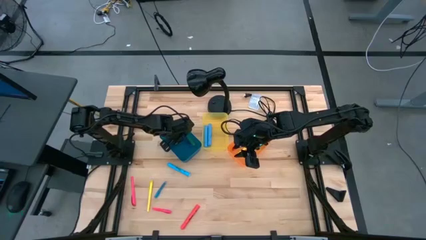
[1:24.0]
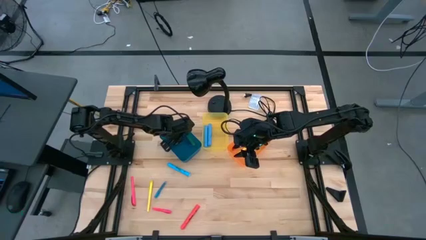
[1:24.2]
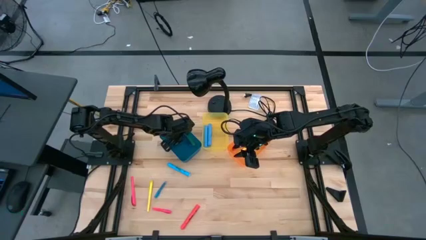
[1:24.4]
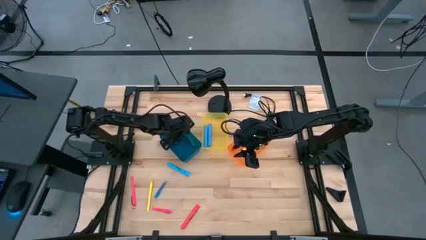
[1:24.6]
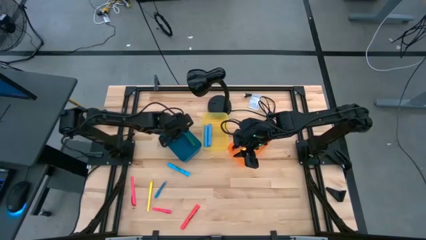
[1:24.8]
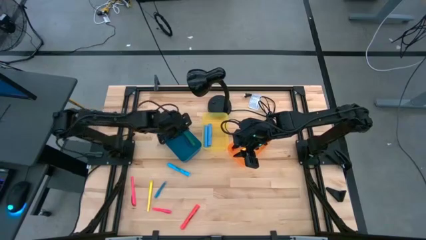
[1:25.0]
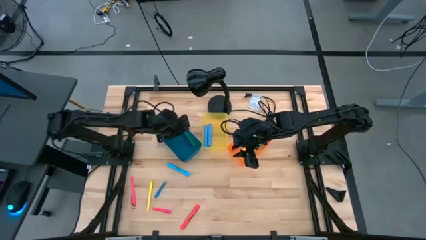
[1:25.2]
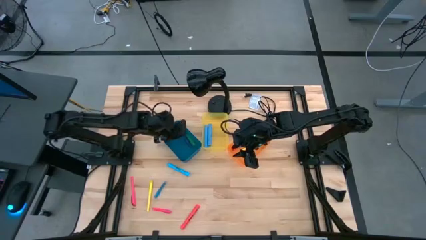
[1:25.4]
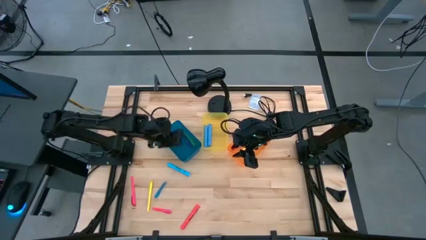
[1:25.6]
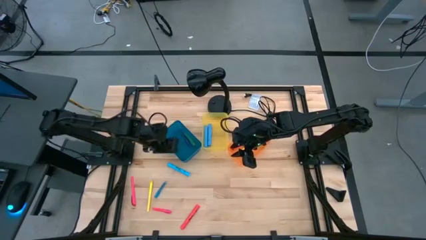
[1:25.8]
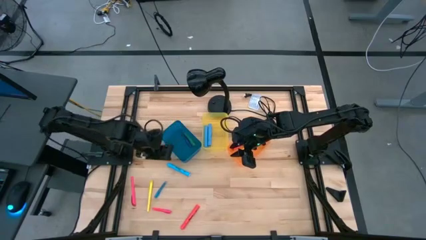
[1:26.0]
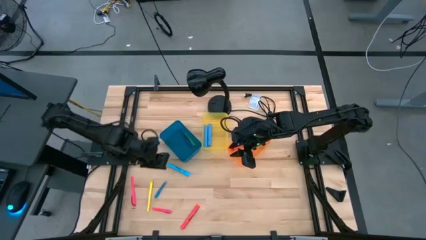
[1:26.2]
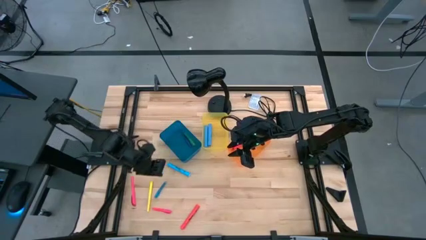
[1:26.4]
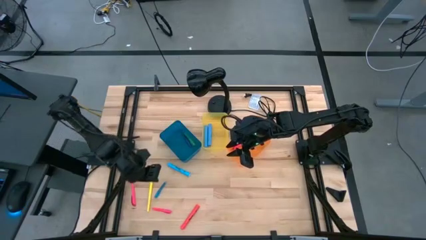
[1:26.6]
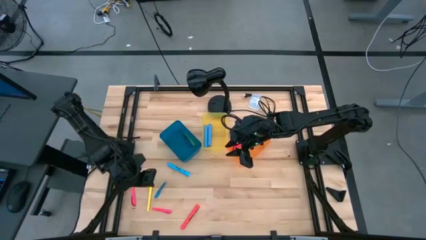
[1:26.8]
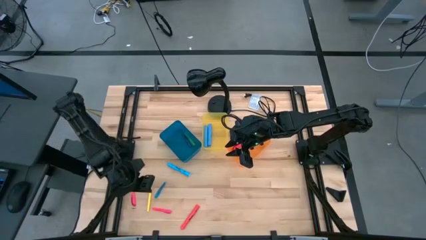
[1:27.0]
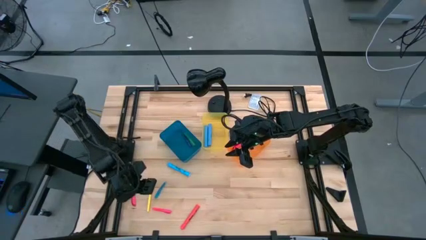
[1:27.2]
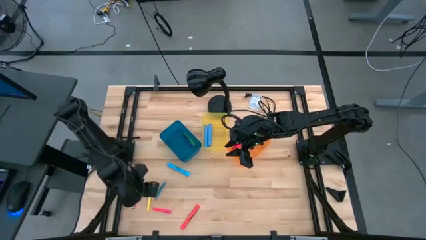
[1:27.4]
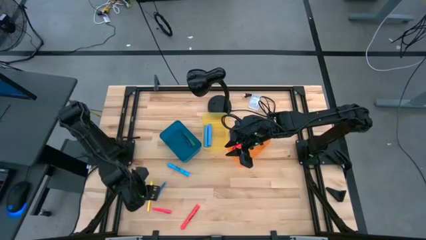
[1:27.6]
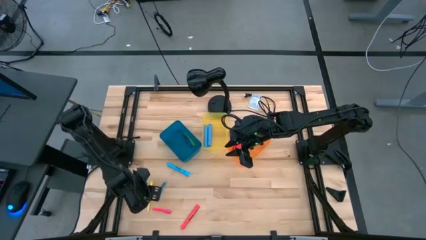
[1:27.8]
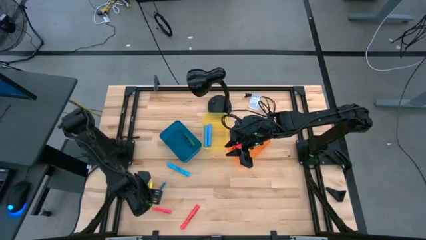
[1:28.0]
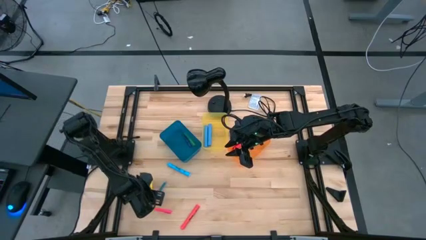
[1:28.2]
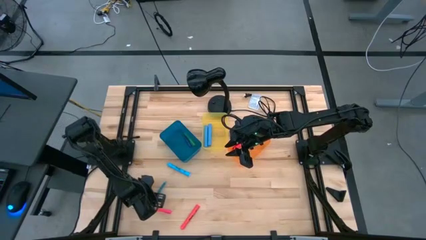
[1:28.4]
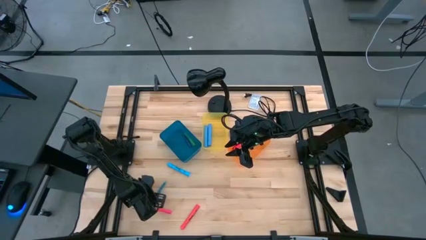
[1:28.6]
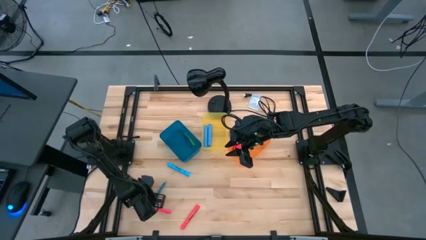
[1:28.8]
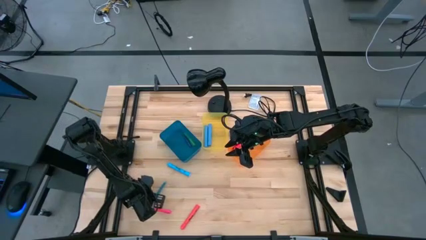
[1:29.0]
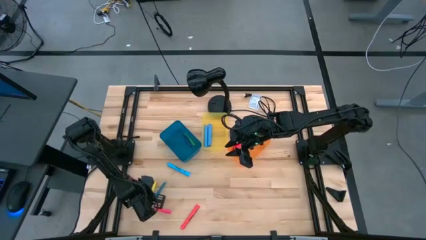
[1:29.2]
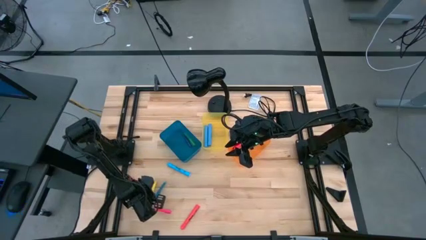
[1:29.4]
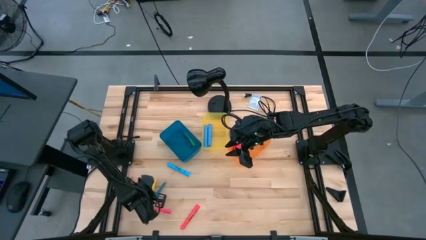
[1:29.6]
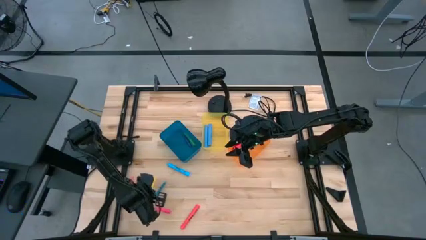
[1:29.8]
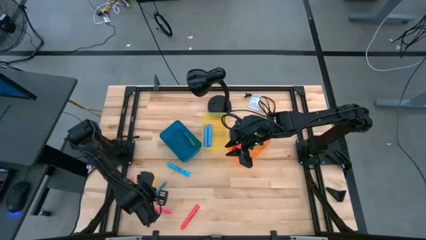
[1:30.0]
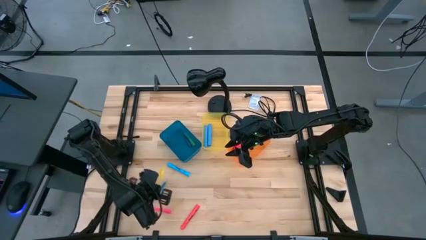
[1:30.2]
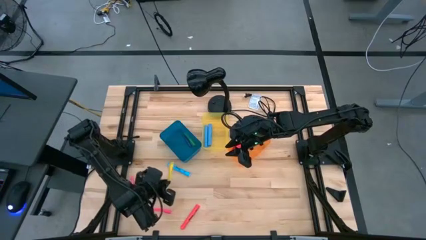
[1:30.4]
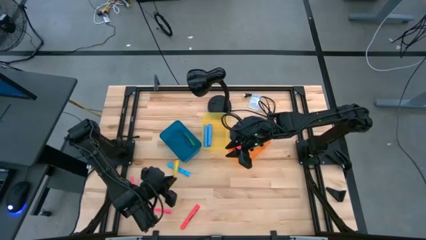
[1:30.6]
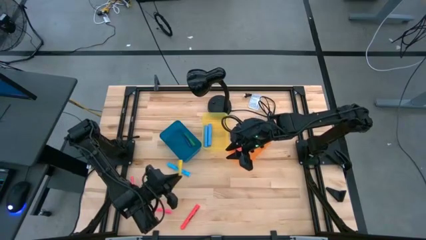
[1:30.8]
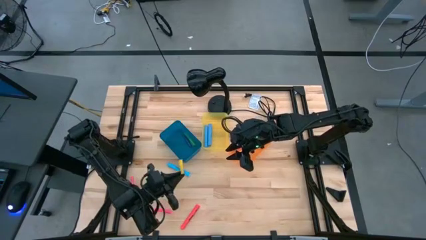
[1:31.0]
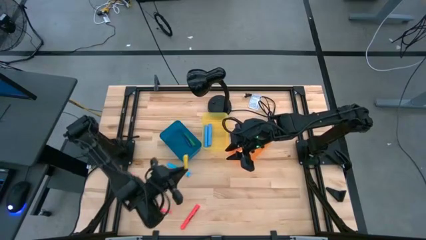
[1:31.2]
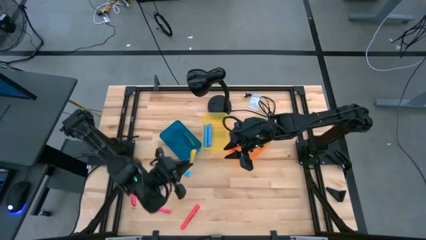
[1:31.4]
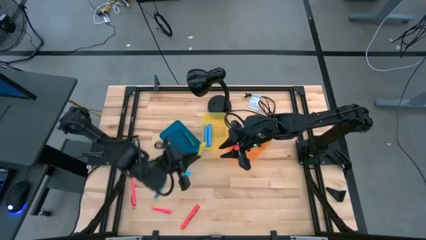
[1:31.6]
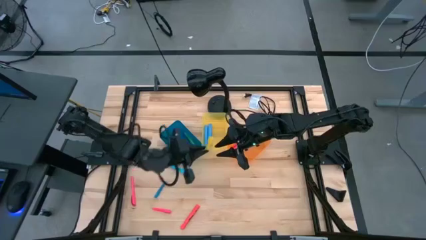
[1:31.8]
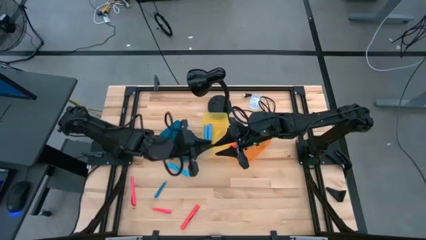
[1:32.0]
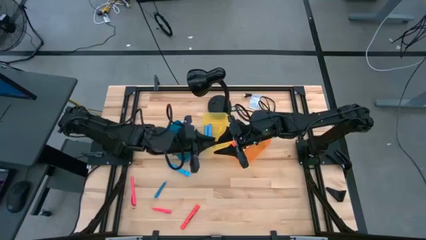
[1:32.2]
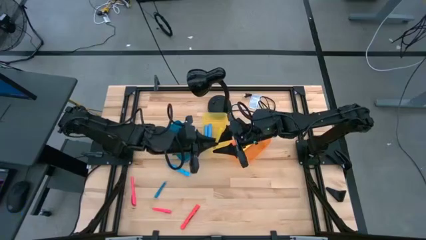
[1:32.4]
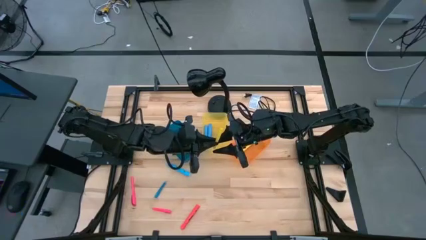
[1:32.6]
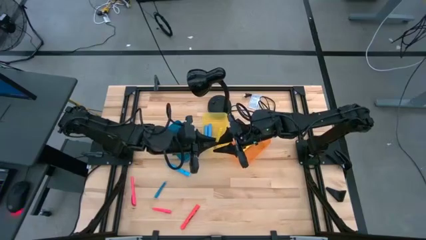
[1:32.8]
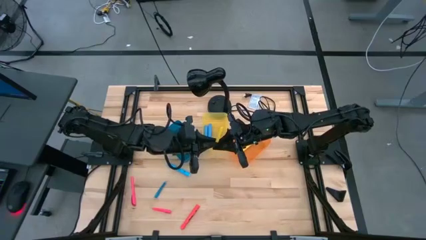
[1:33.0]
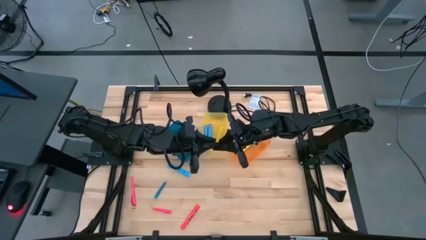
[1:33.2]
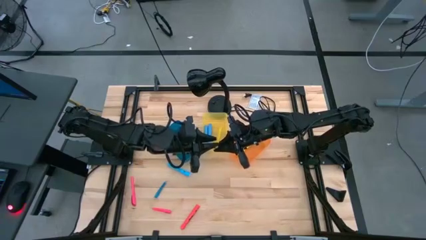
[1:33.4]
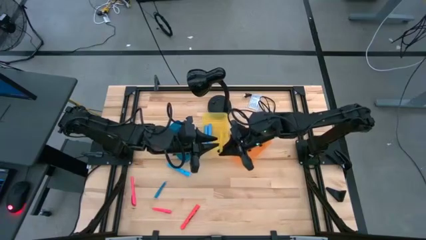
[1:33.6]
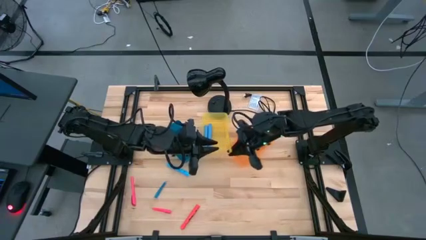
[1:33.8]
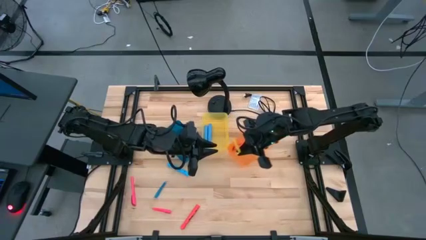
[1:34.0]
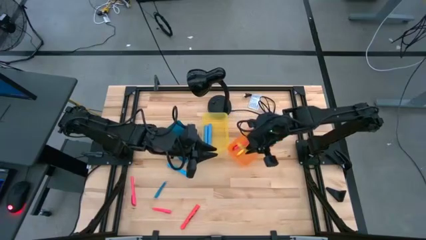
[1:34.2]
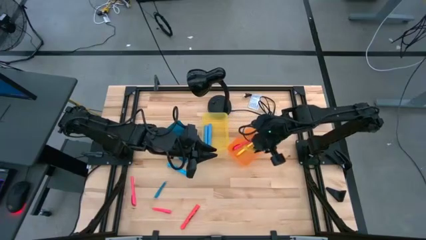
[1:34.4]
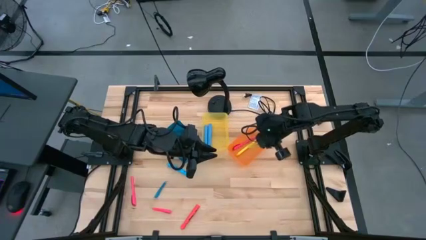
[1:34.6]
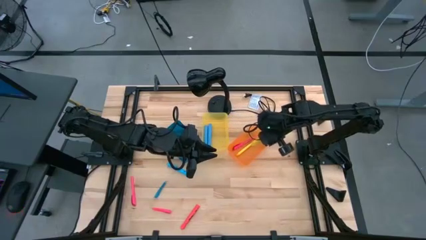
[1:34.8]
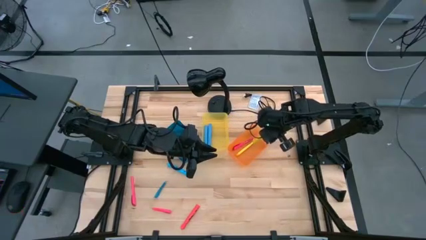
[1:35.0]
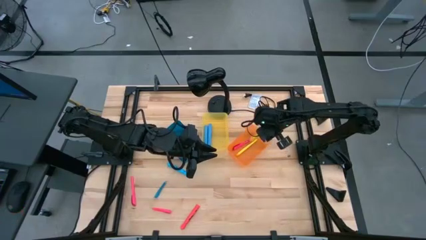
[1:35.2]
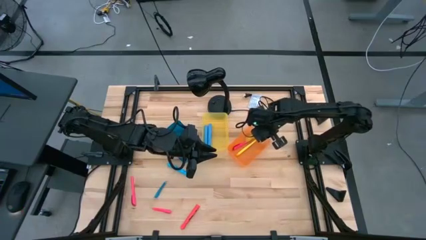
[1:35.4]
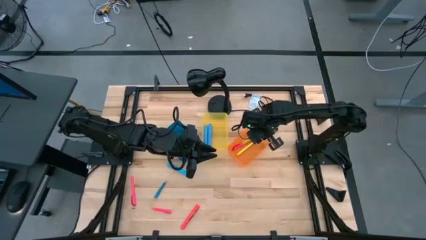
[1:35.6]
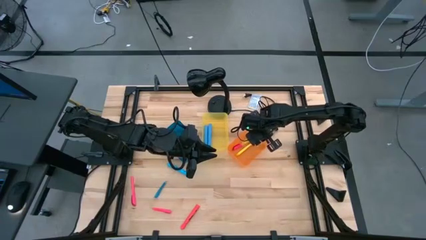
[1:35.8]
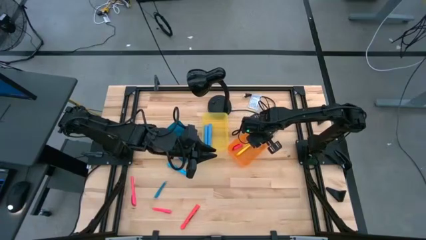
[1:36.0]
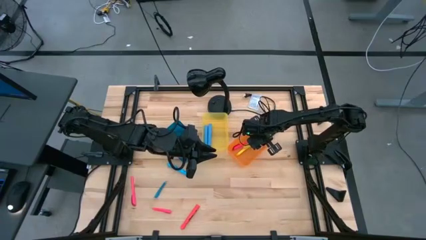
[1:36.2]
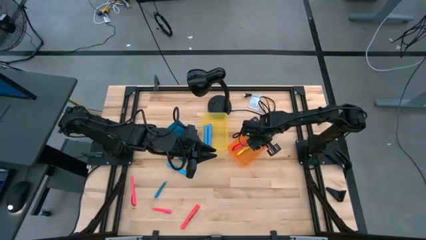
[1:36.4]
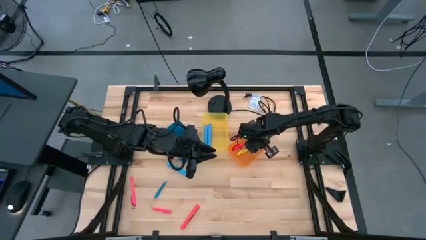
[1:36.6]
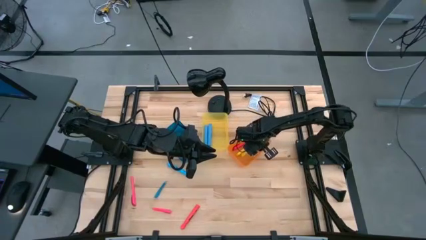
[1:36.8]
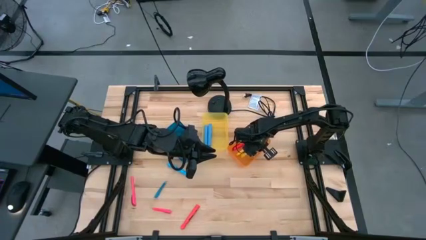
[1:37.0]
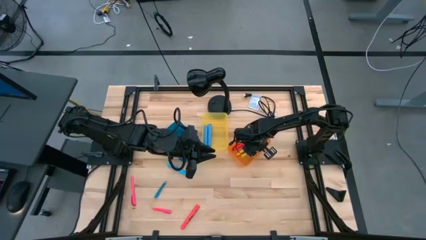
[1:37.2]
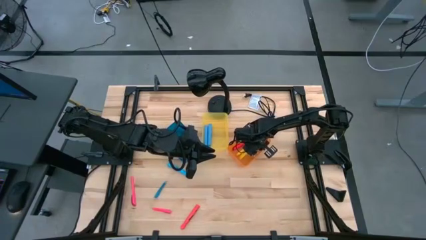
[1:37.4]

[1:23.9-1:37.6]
Task: Pick & Place Markers
Put the yellow pen into the orange bin

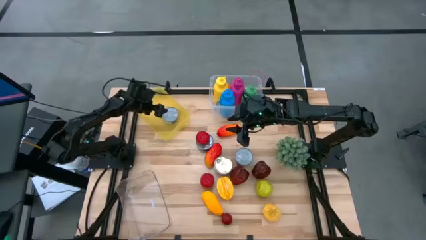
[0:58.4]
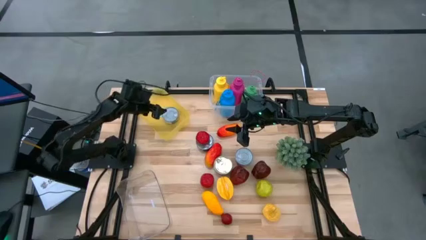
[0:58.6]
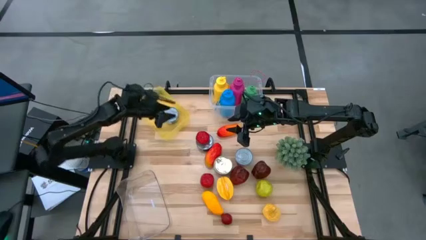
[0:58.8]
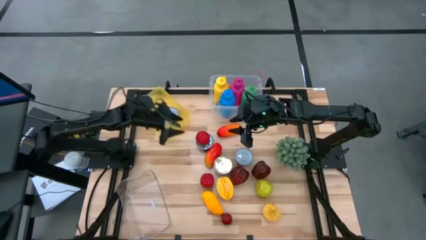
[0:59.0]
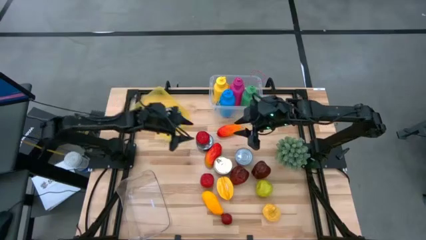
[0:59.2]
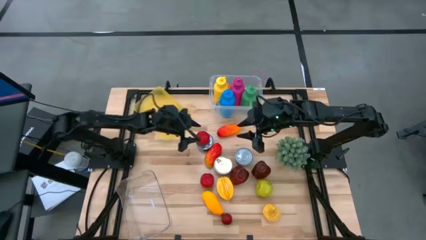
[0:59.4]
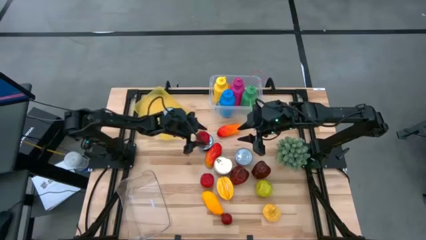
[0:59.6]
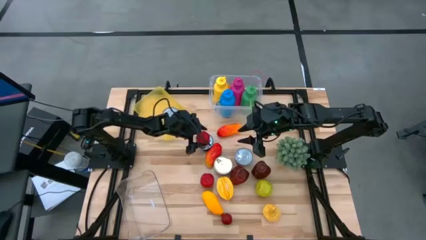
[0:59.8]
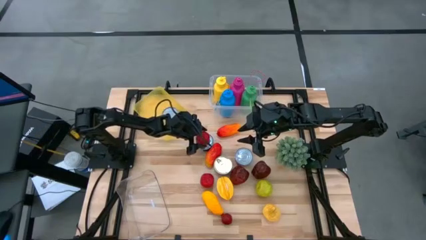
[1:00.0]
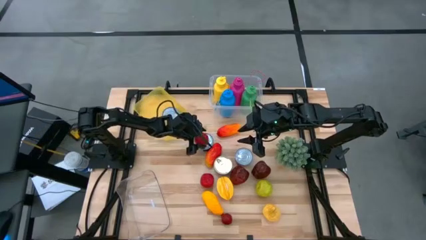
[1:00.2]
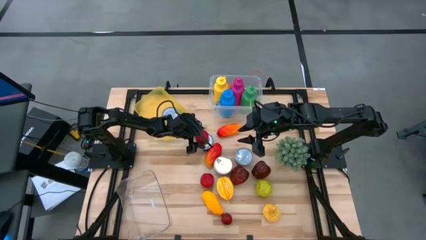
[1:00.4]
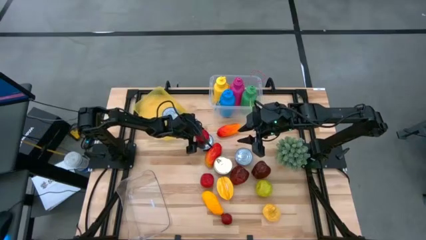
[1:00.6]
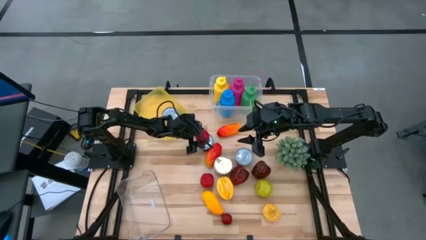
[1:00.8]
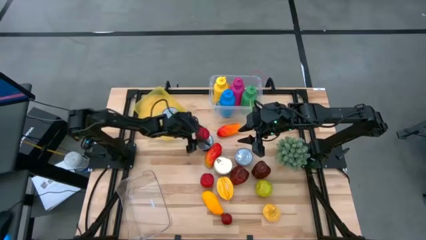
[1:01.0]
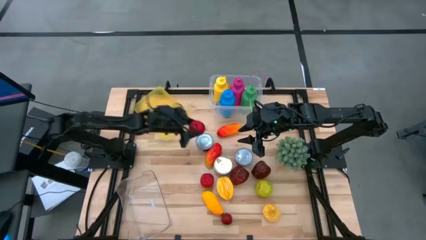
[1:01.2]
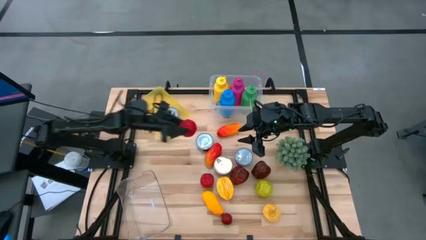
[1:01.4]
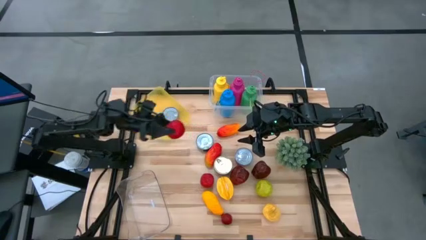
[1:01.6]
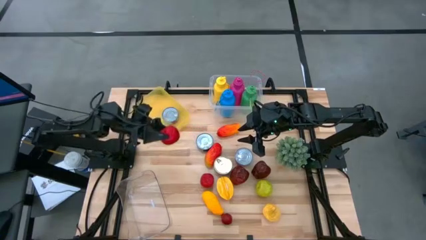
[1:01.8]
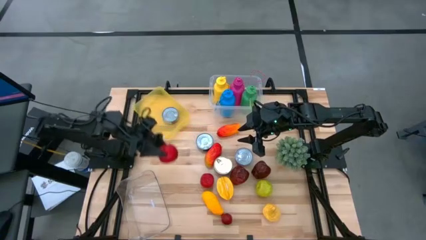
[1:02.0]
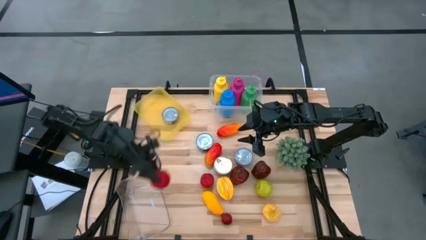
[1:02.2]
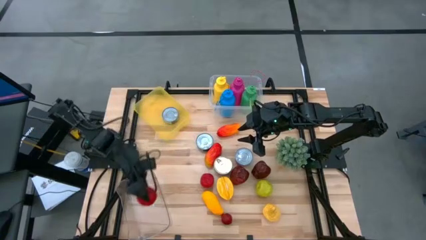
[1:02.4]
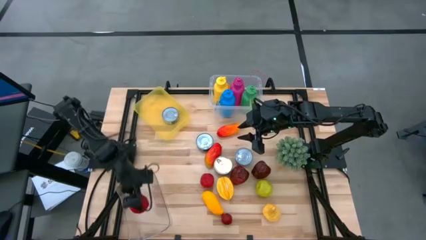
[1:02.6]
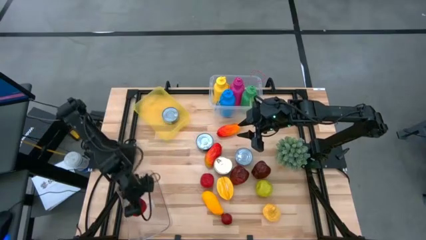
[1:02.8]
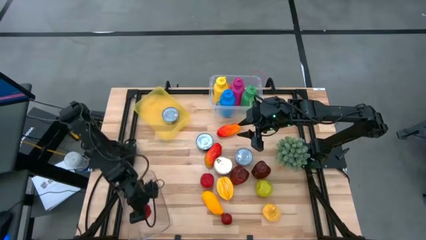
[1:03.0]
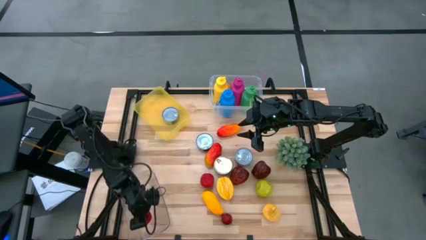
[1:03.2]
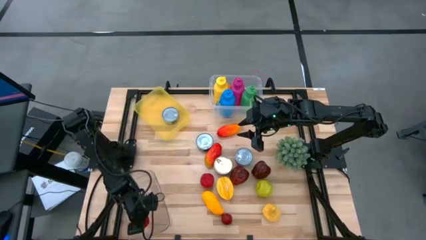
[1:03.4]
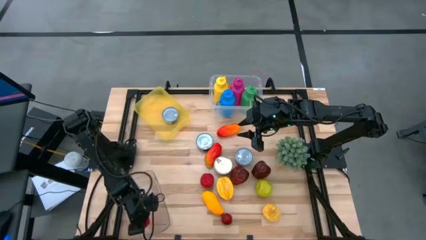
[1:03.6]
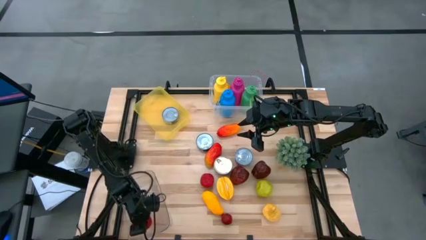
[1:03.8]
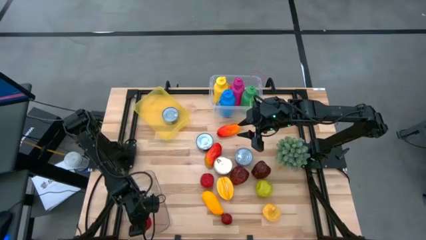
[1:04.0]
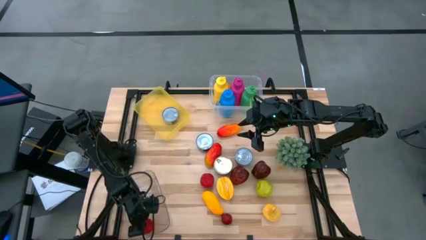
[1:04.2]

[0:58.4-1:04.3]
Task: Pick & Place Food Item
Put the top red tomato into the transparent bin
